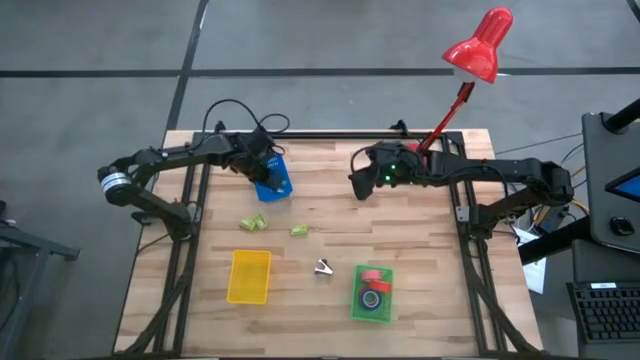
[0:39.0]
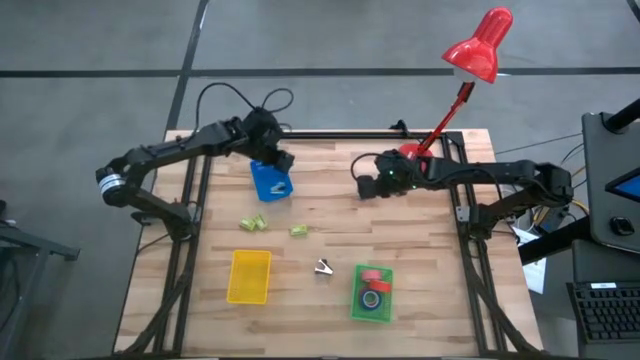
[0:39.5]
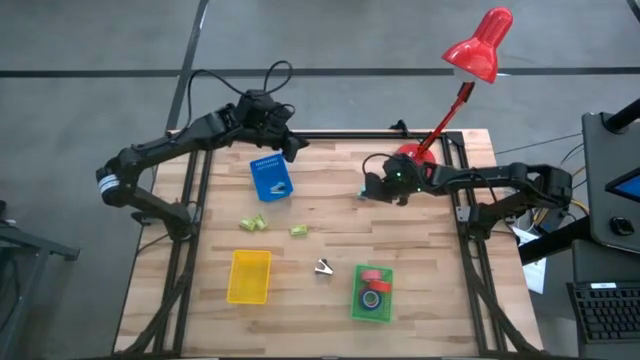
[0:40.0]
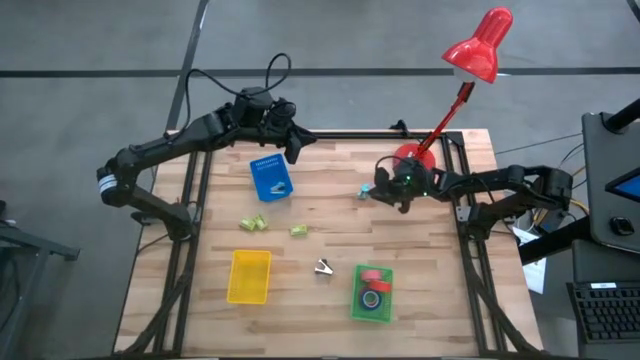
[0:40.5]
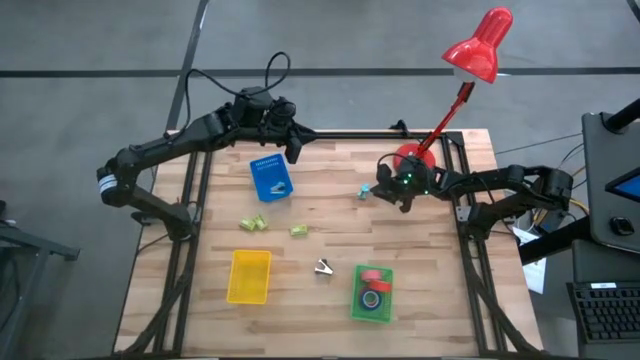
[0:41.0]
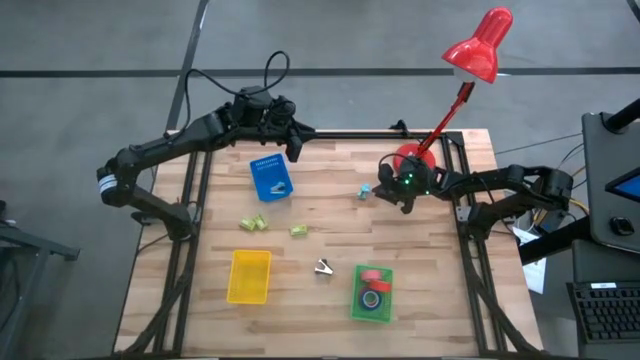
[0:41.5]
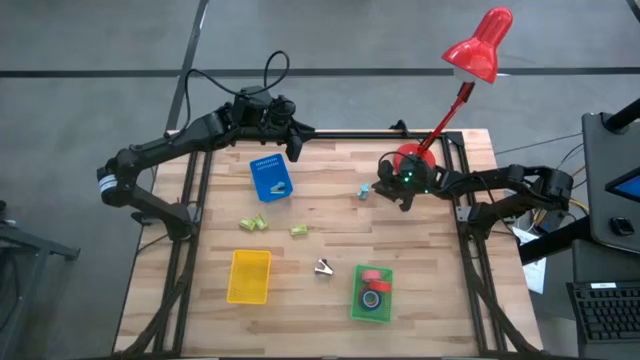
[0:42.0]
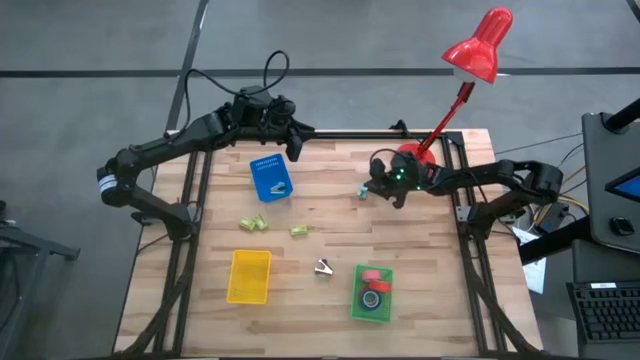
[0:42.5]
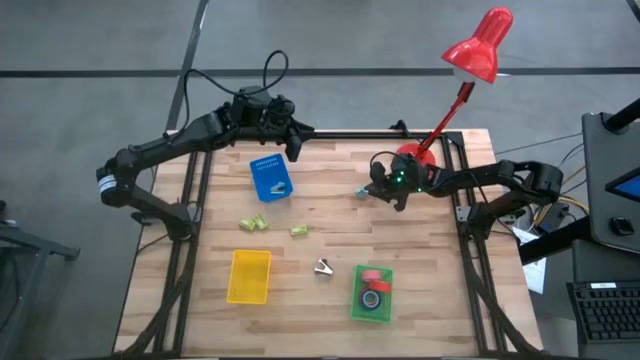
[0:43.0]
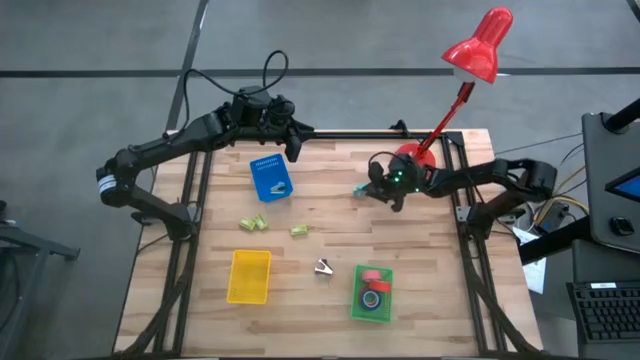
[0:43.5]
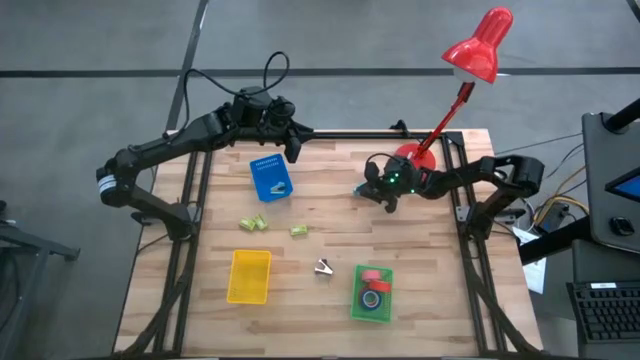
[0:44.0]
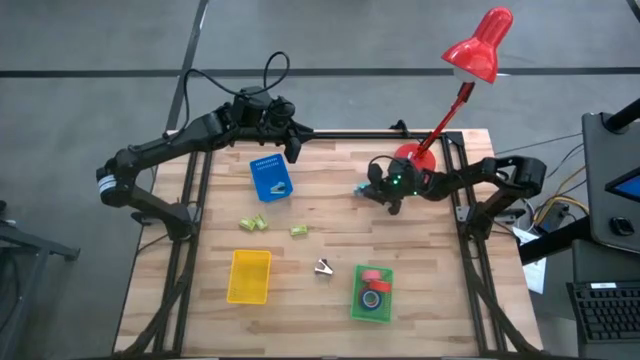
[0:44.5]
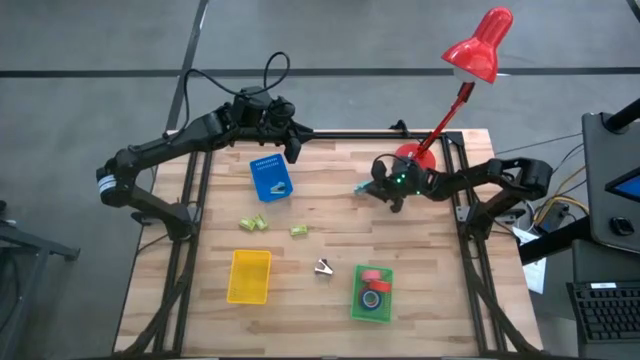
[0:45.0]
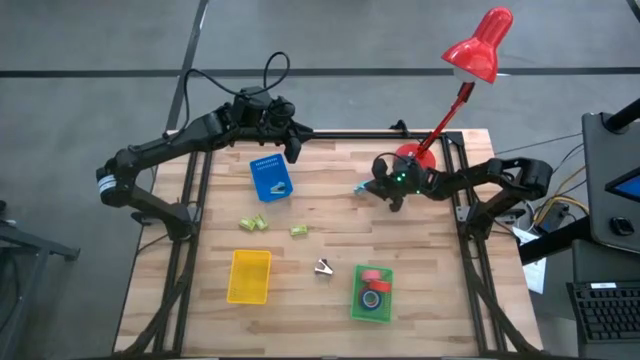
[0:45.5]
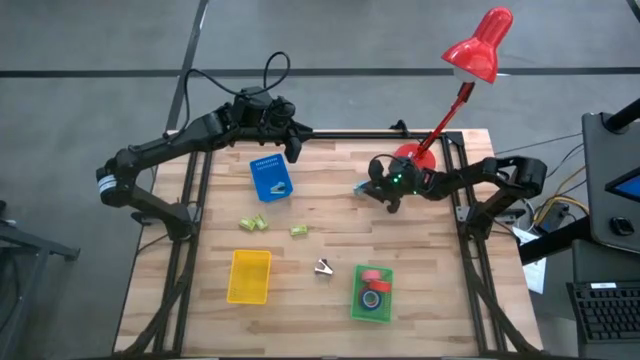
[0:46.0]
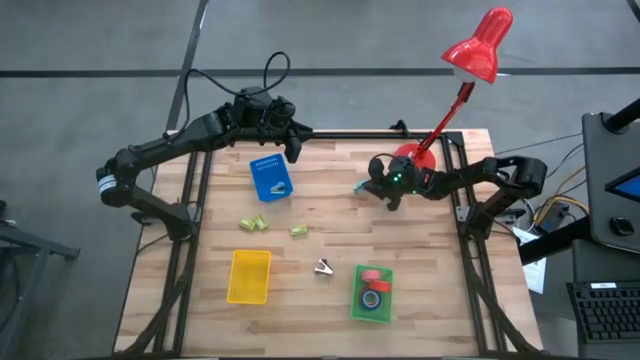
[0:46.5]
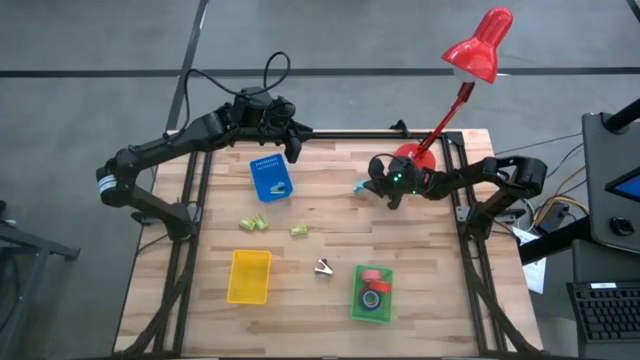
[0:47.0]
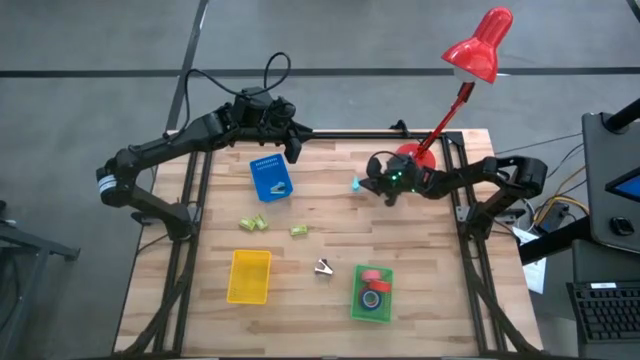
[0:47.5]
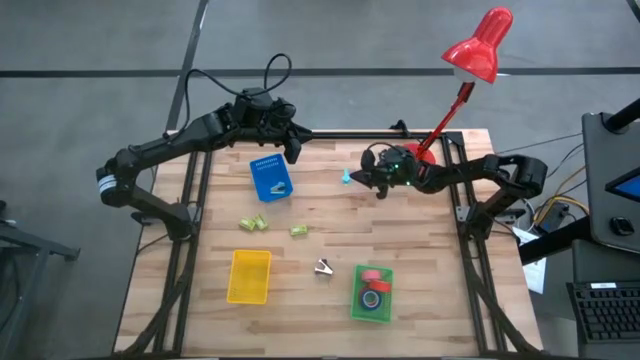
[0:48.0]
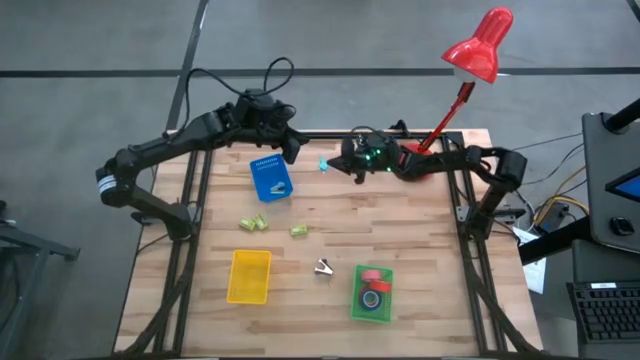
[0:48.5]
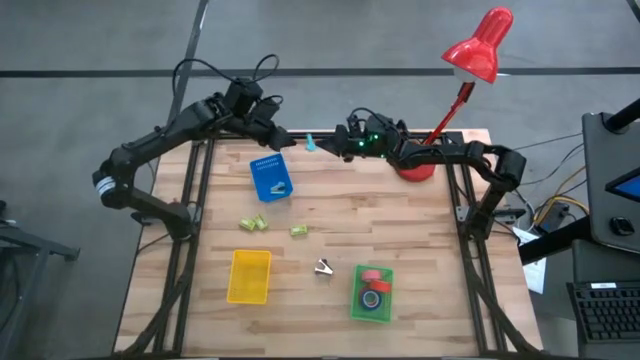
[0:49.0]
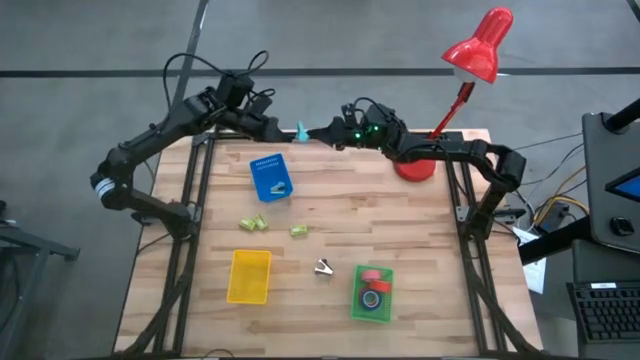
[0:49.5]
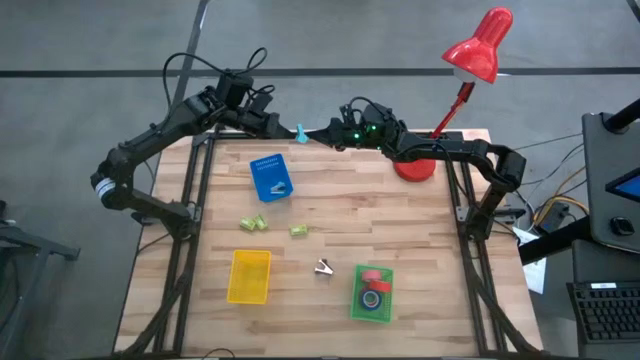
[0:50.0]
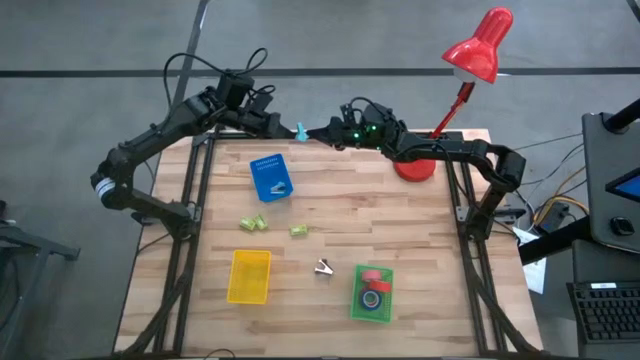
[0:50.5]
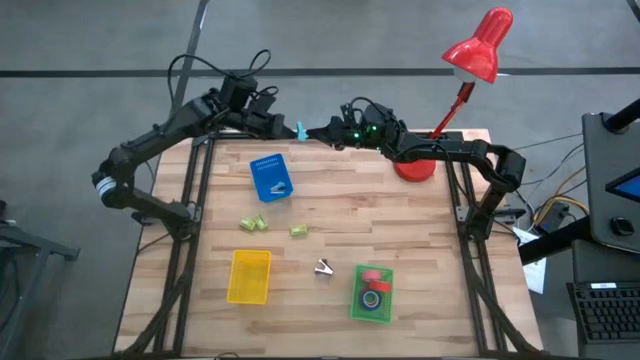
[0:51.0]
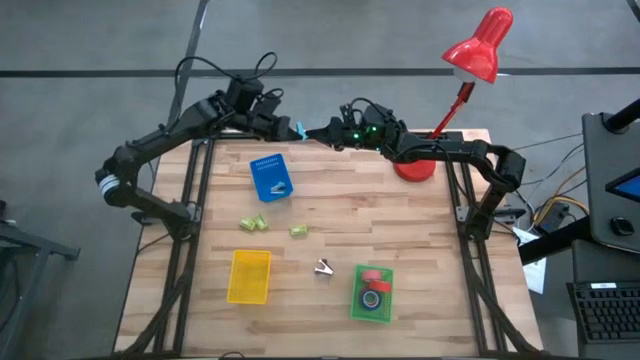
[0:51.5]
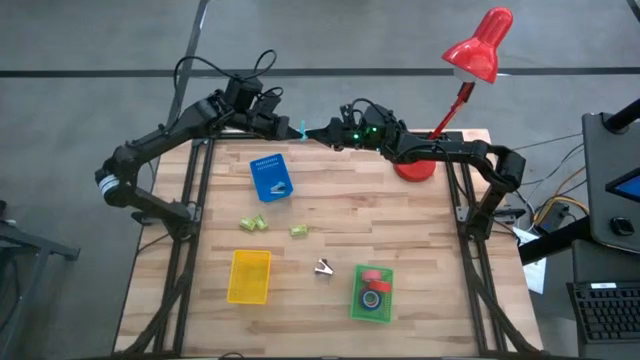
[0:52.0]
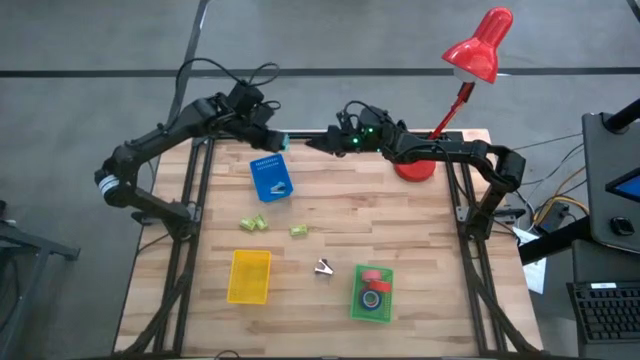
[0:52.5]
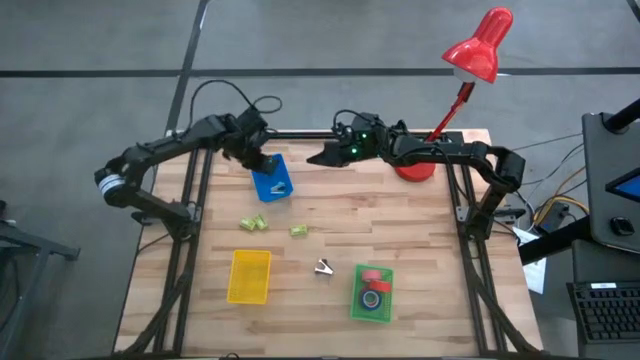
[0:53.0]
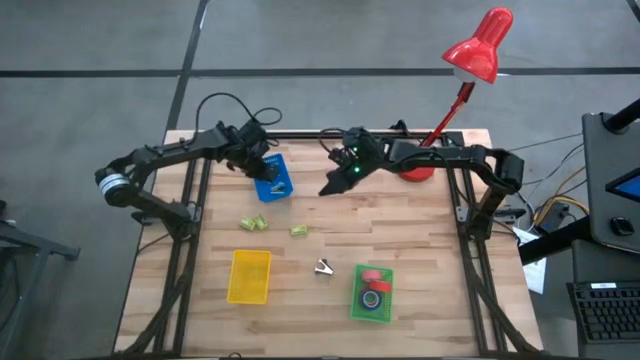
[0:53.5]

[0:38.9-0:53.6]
Task: Pick and place Stapler, Stapler remover, tape
Put the blue staple remover into the blue bin

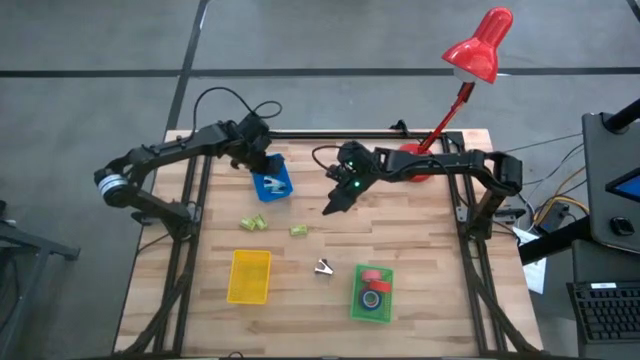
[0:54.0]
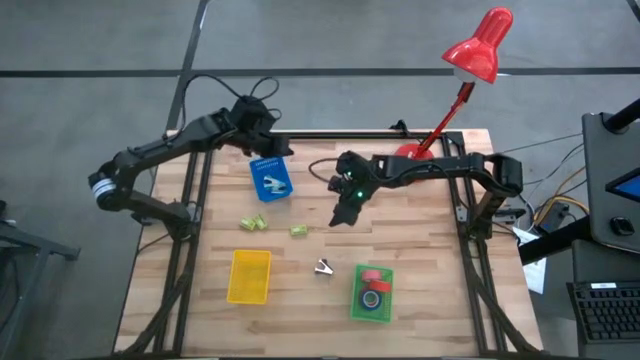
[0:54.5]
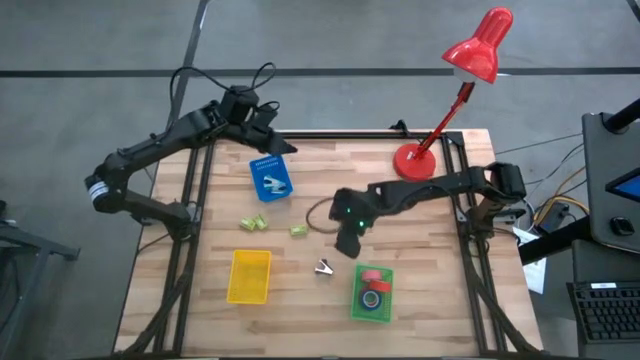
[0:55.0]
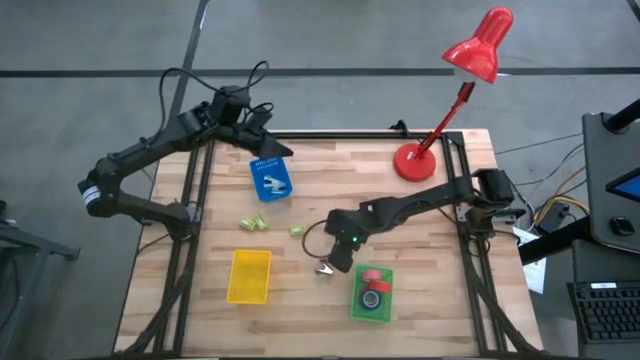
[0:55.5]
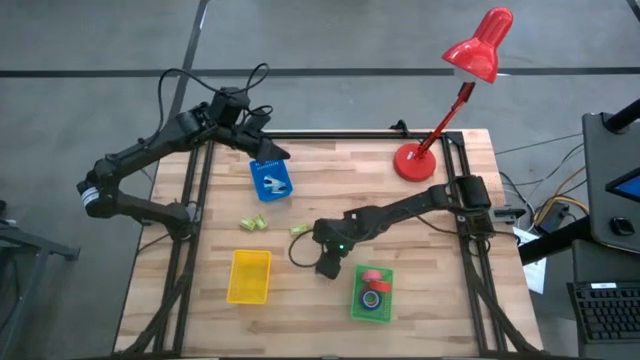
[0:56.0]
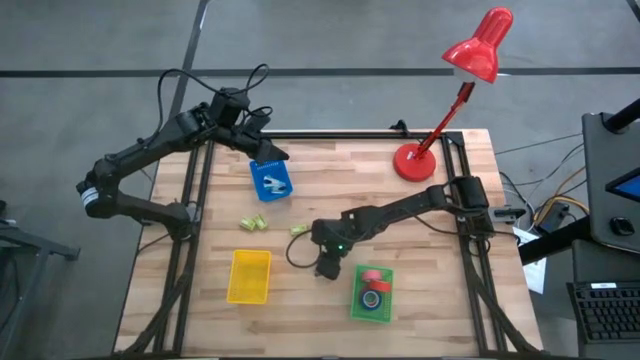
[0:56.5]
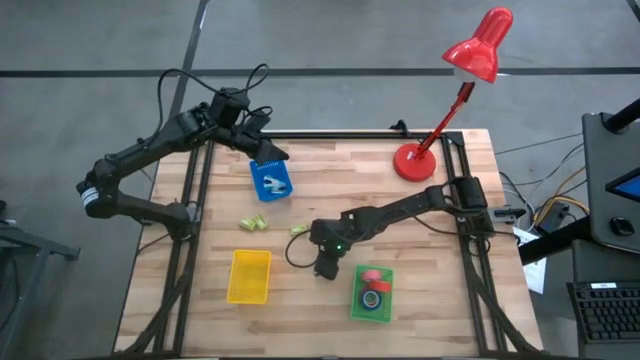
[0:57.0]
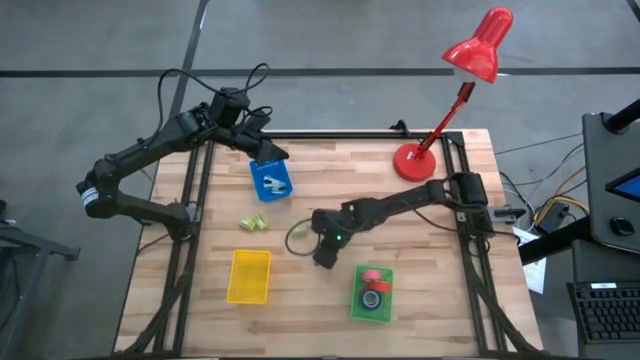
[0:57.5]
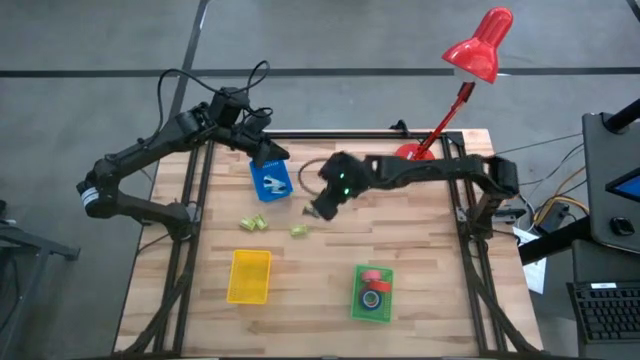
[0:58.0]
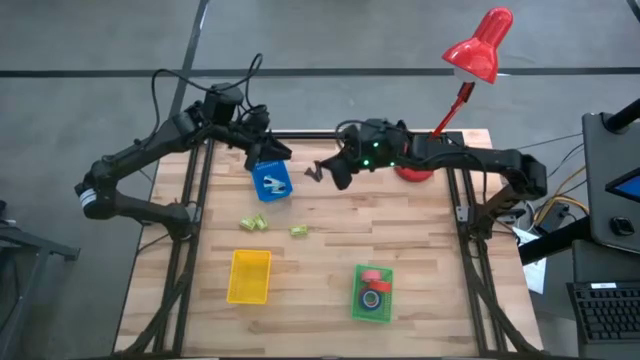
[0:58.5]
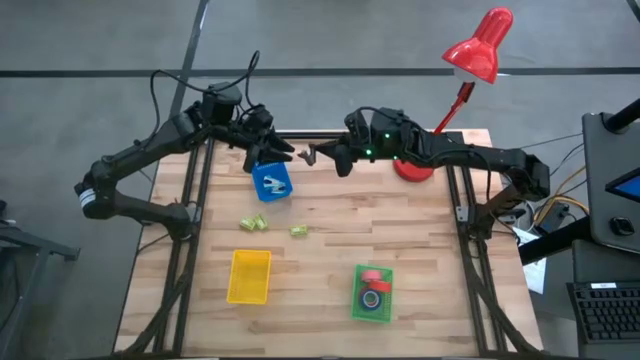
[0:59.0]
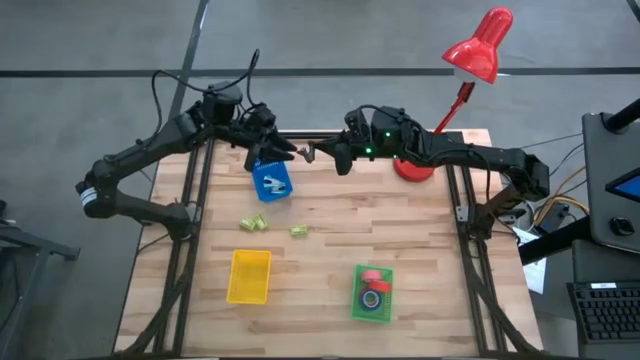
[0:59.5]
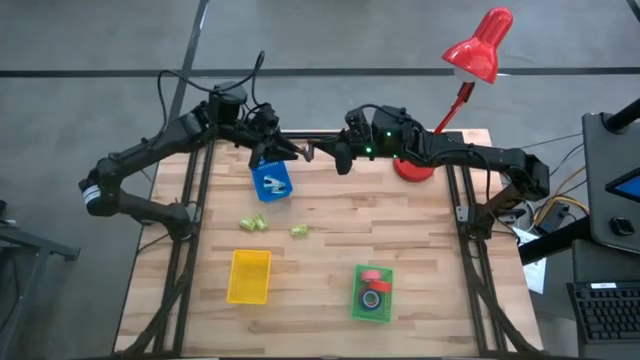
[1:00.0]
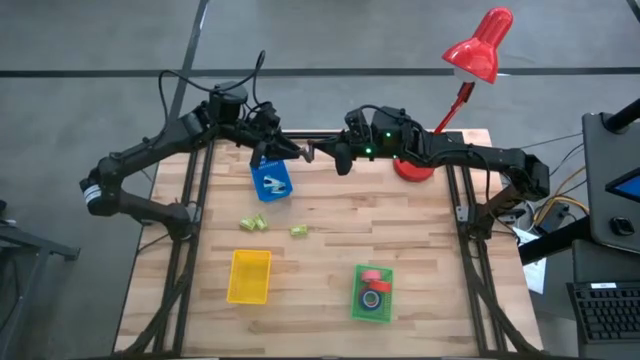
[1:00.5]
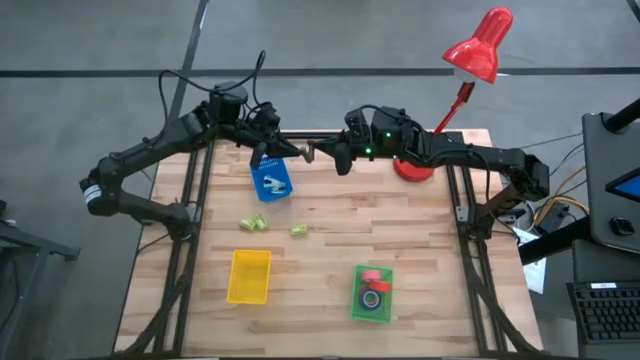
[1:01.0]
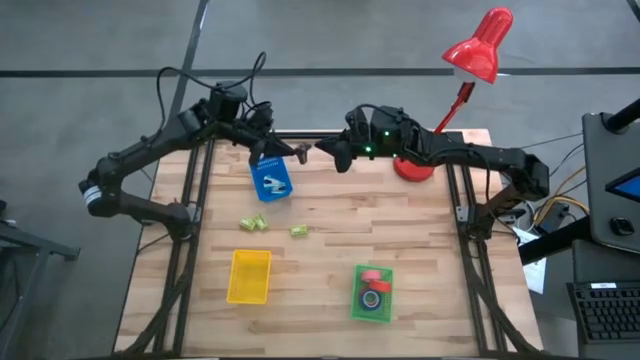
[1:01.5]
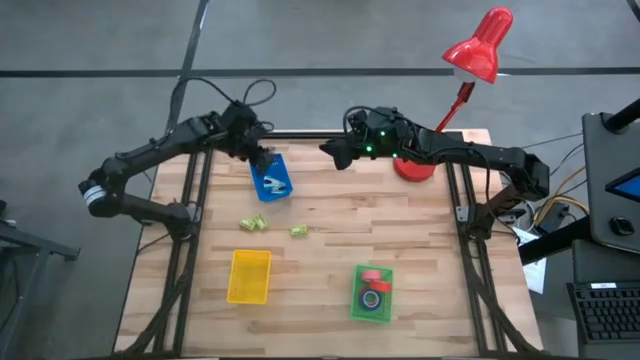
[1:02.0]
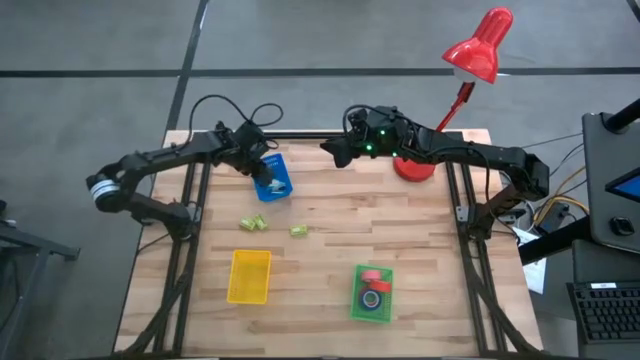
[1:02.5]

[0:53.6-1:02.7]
Put the gray staple remover into the blue bin
